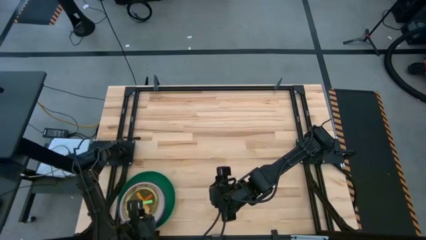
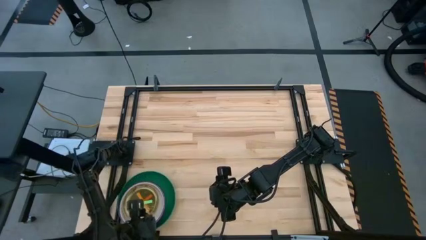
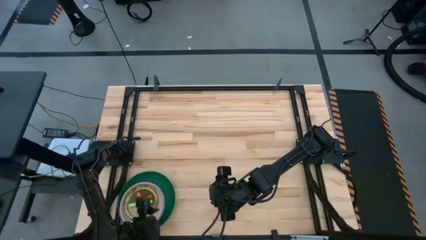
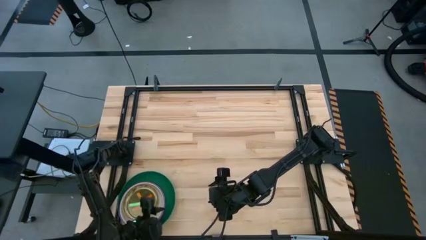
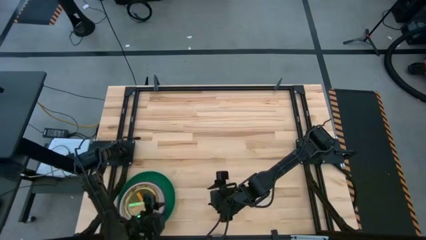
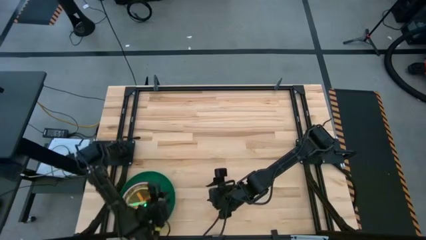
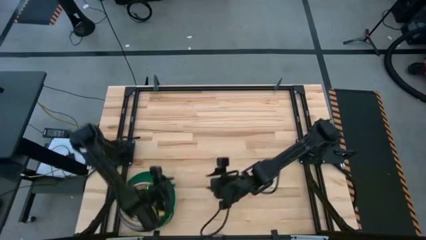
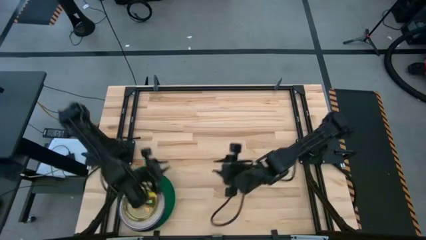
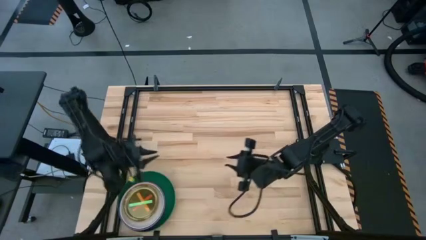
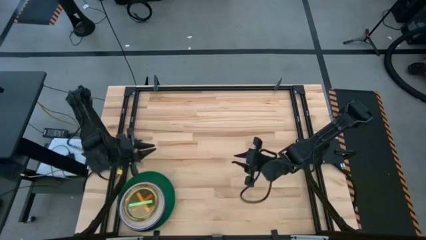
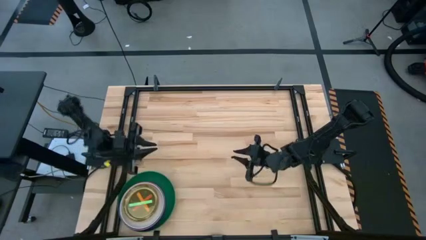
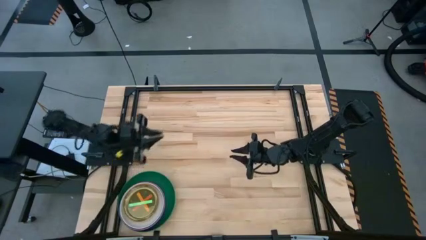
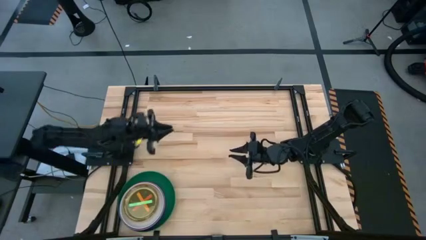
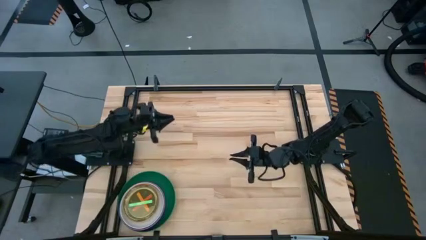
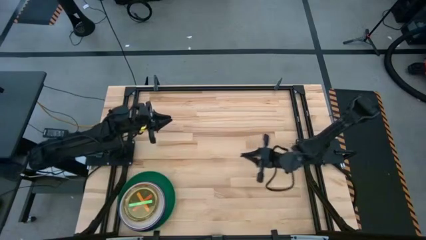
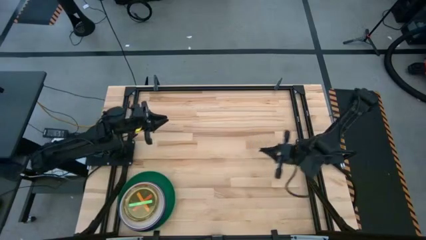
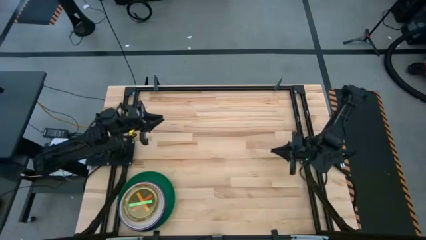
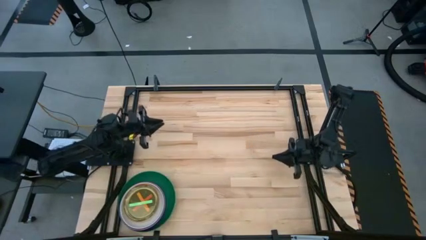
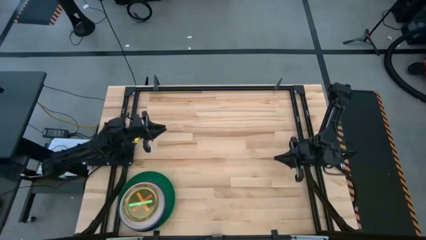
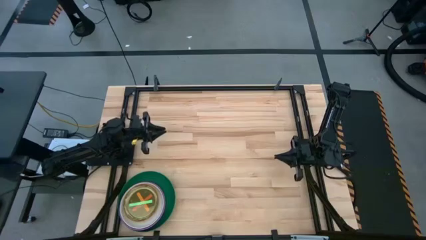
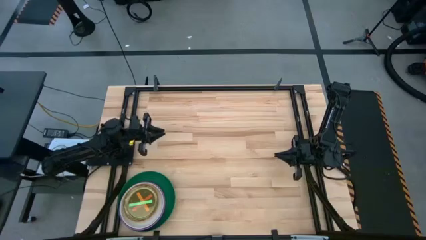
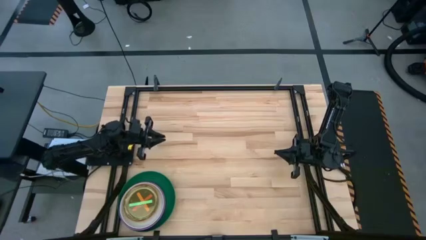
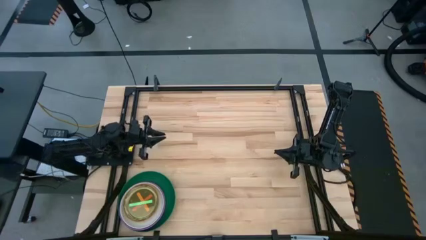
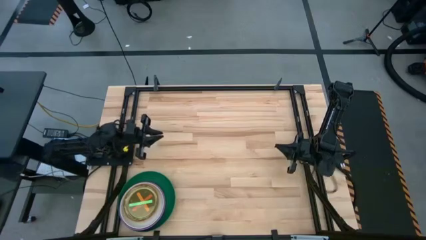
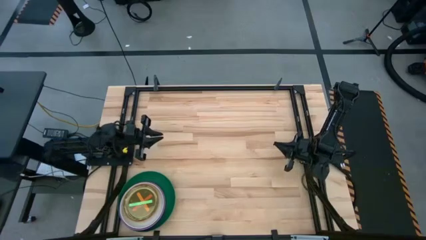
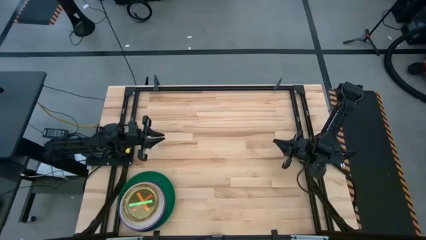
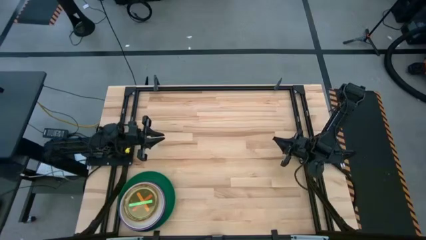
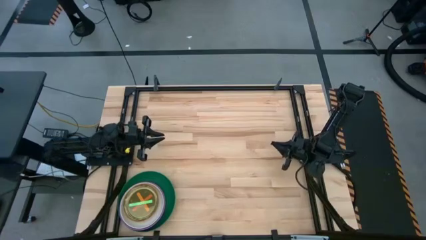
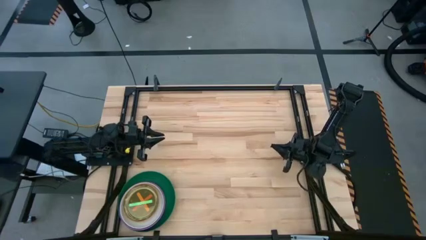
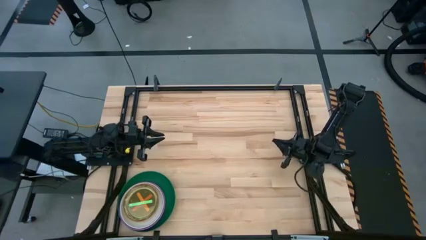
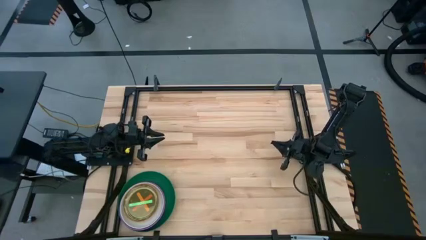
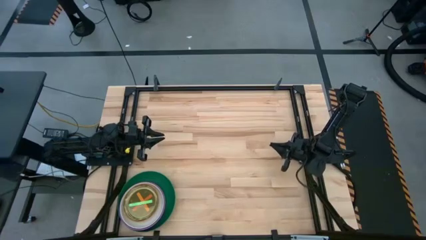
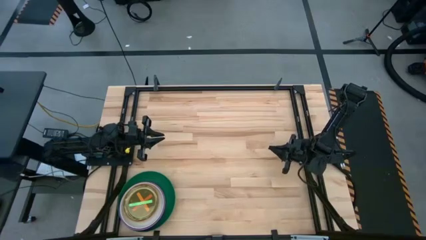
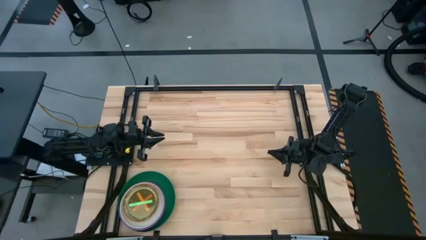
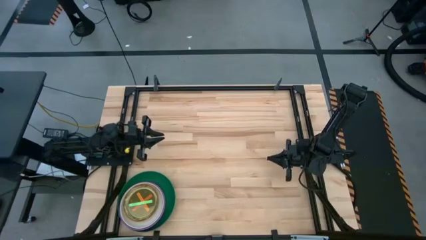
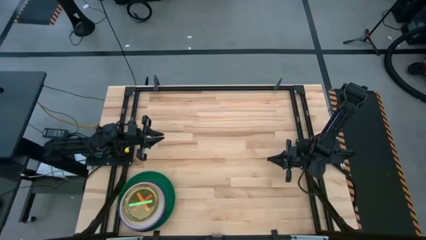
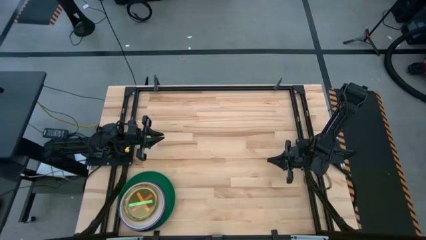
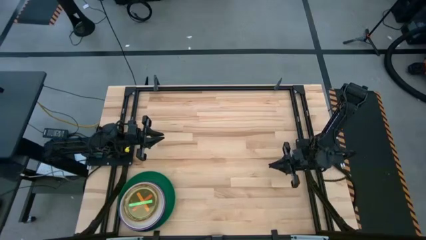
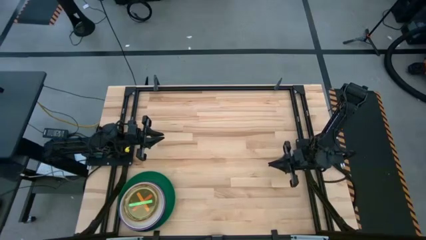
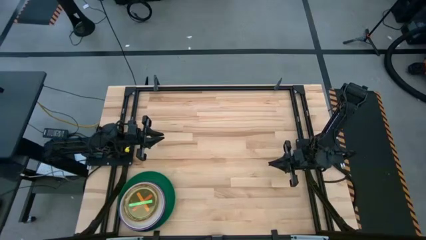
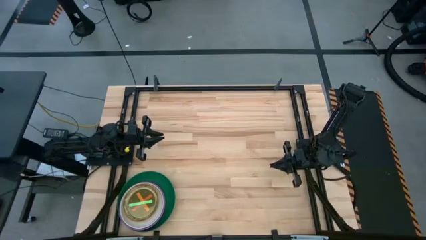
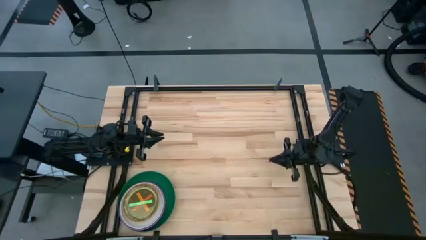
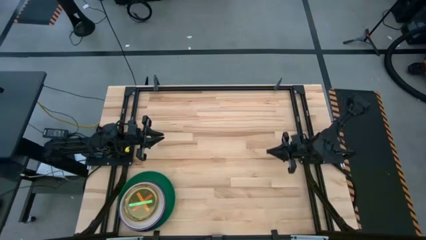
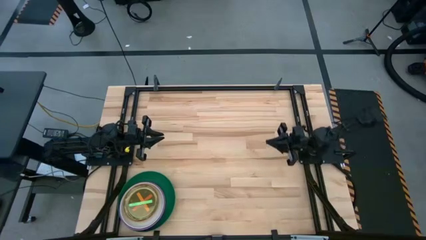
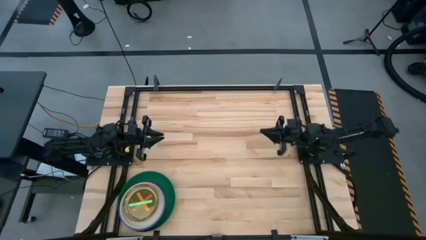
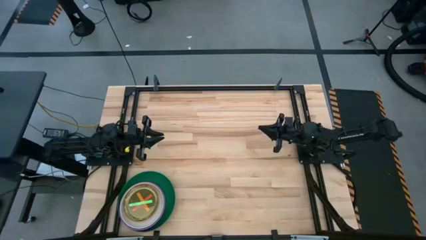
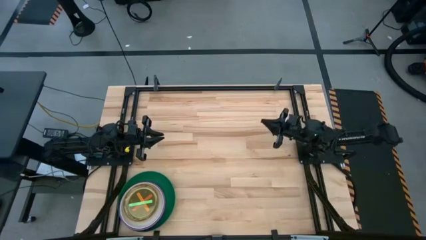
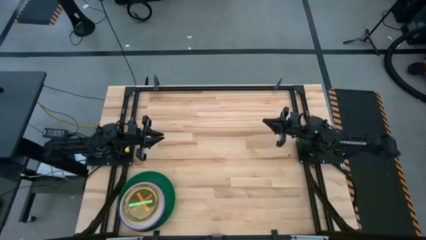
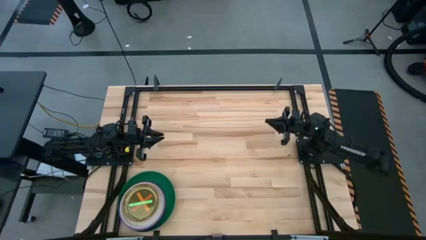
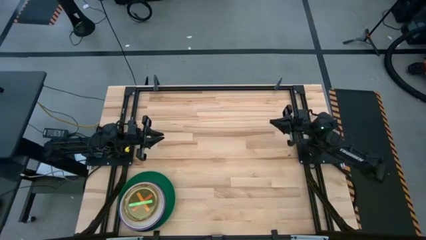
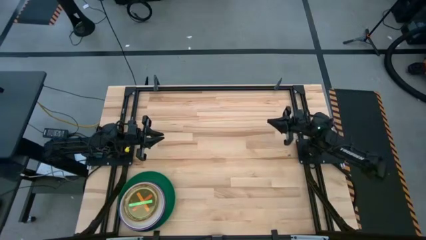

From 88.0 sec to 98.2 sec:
Task: Stack plastic plates
Return to Home Position

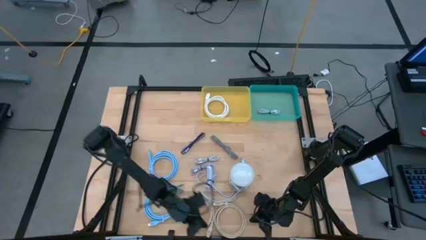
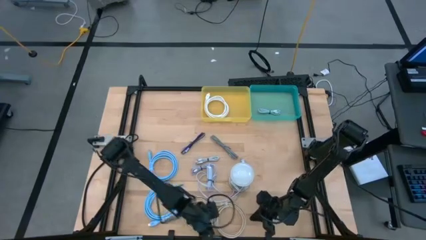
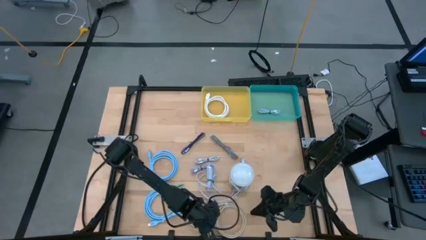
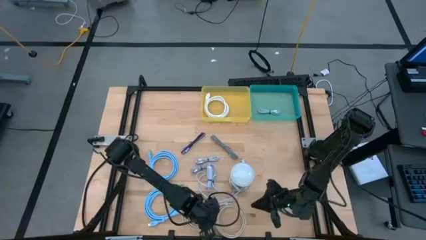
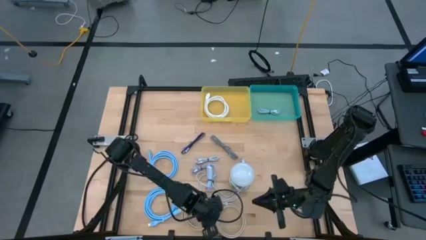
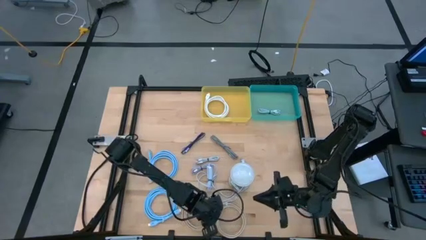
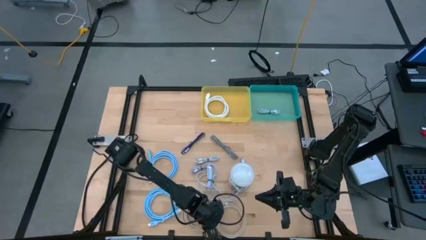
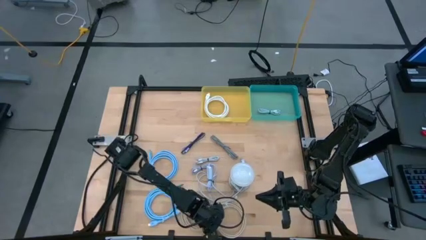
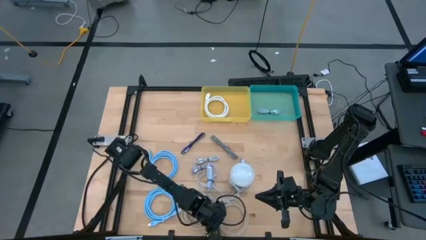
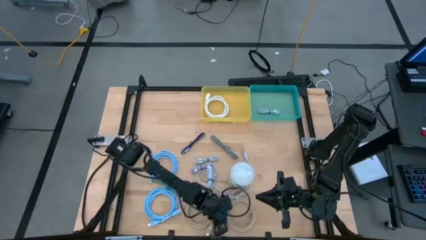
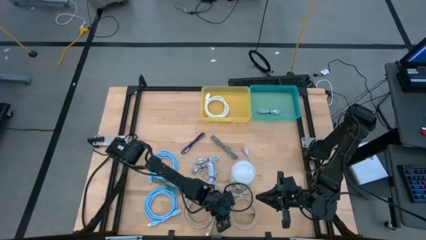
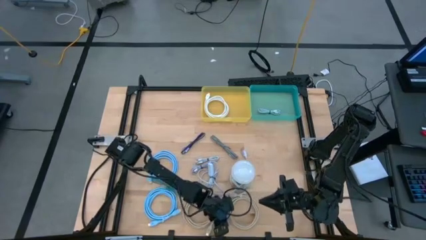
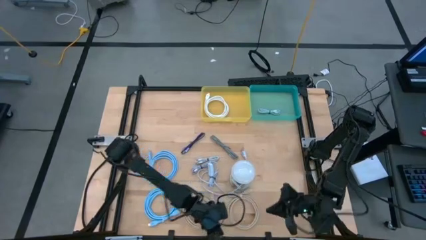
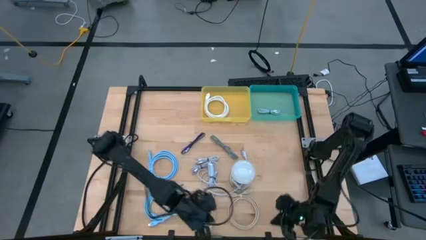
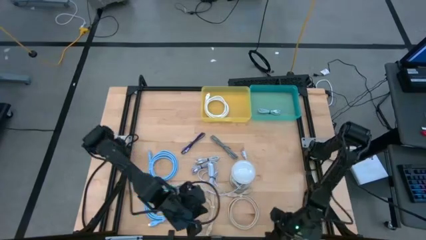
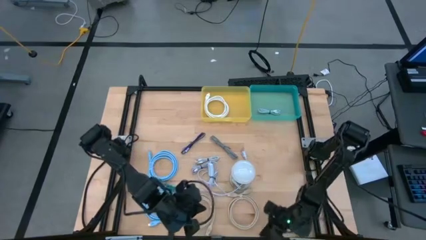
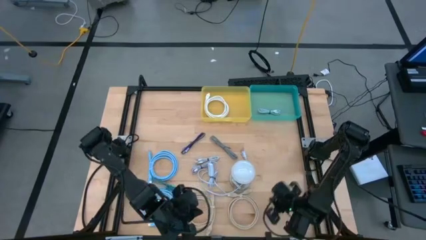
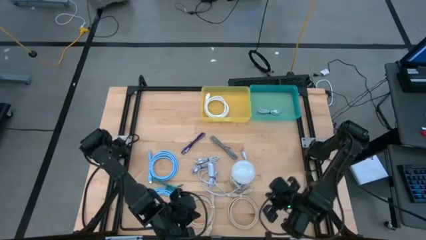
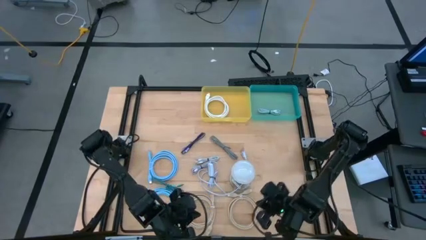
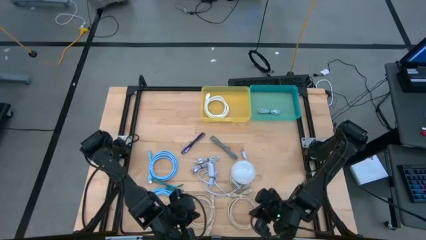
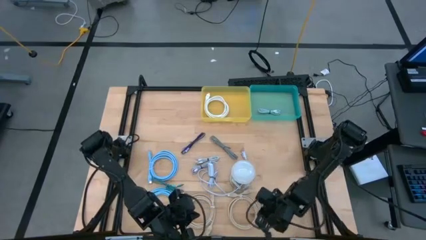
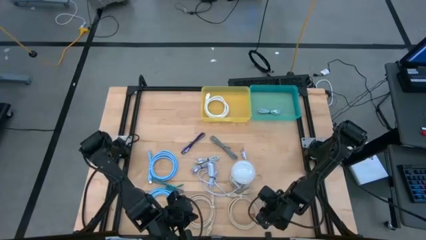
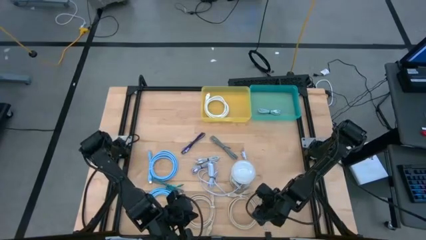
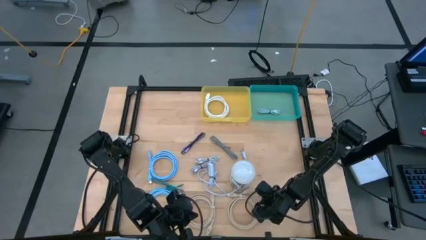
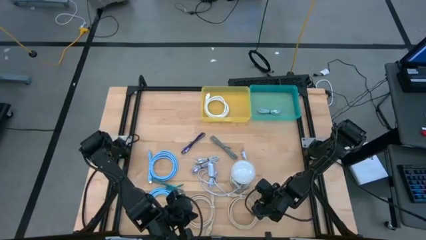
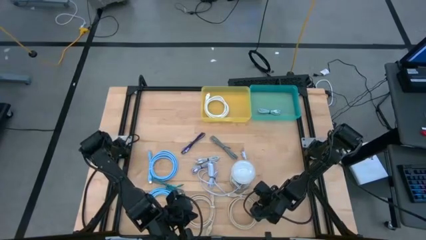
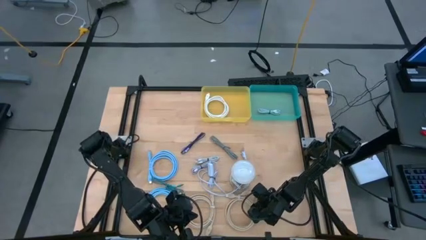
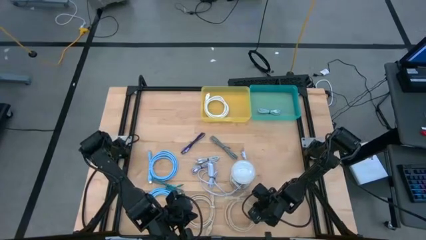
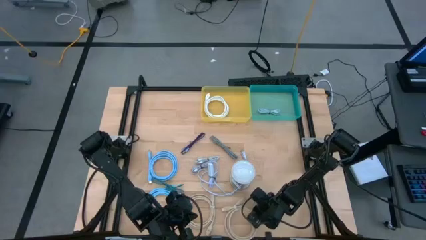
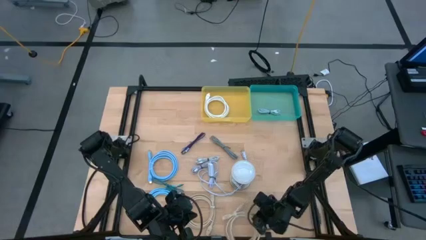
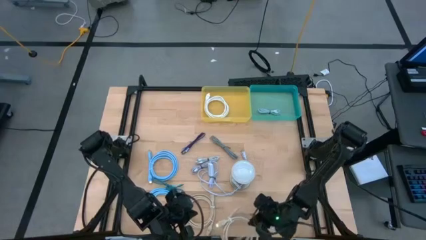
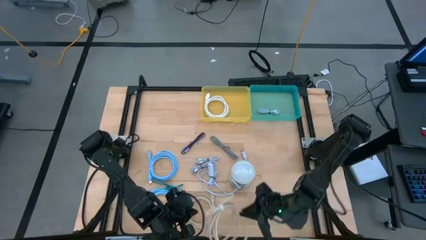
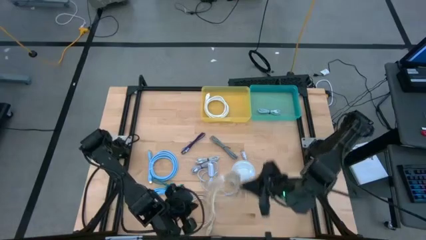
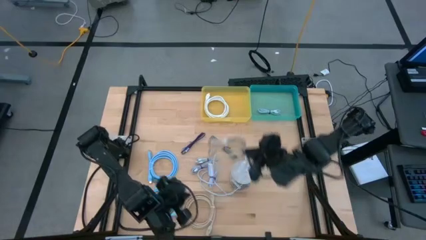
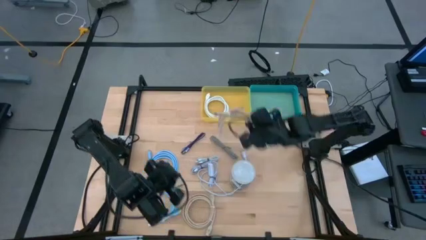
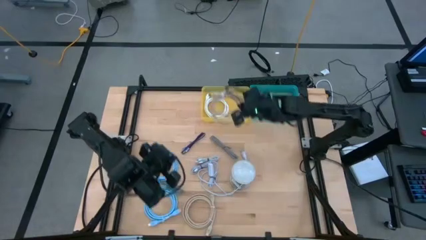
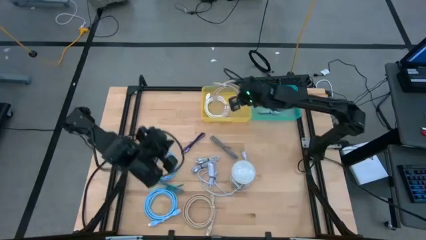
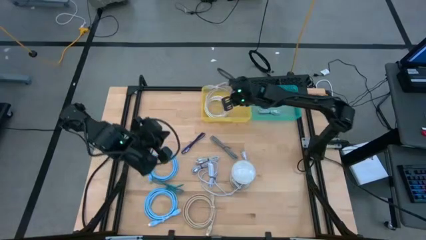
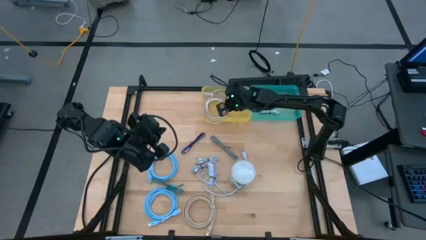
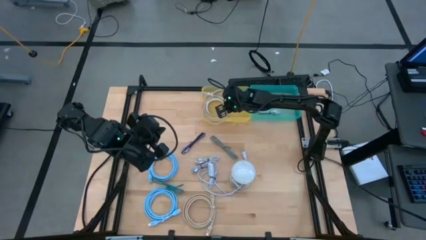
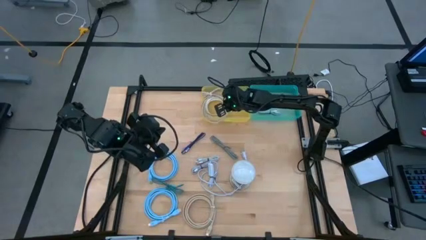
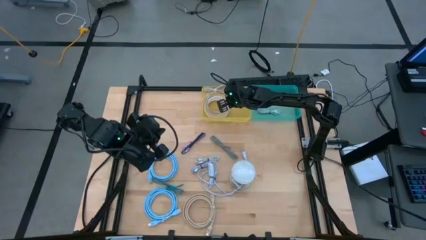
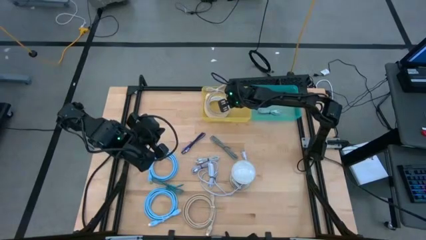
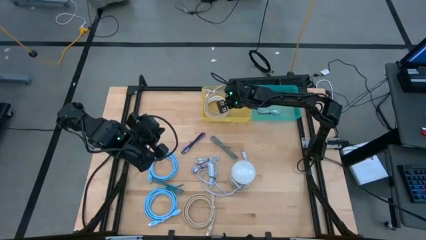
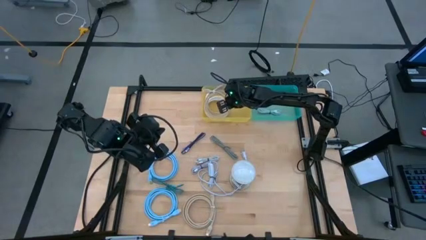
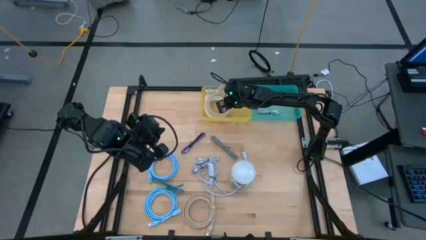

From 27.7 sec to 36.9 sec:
Task: Pick & Place USB Port
Put the right brown HDMI cable into the yellow bin
